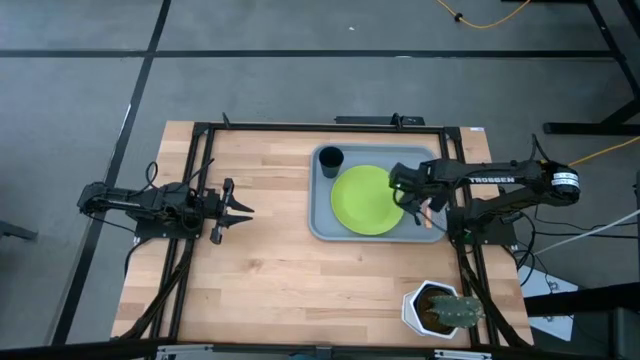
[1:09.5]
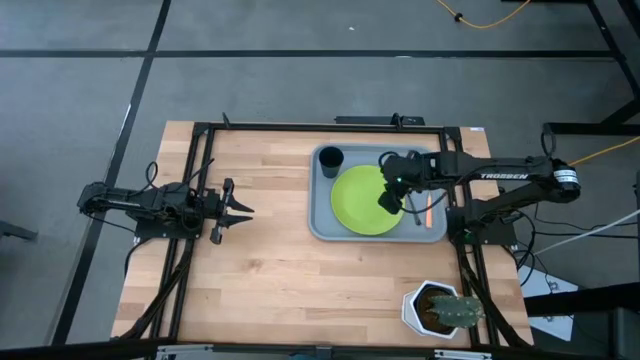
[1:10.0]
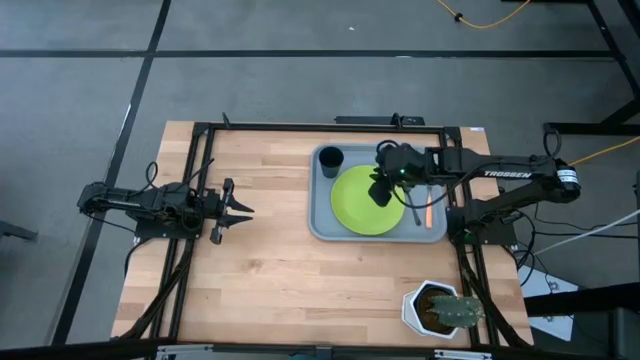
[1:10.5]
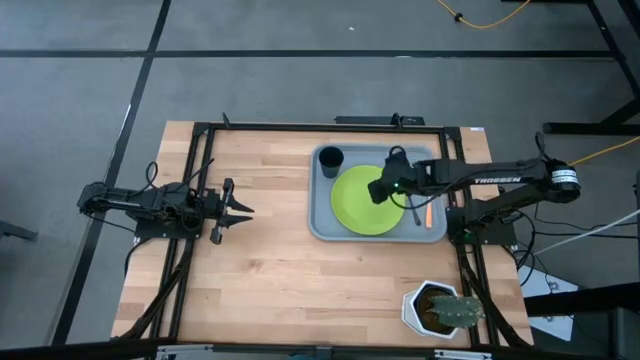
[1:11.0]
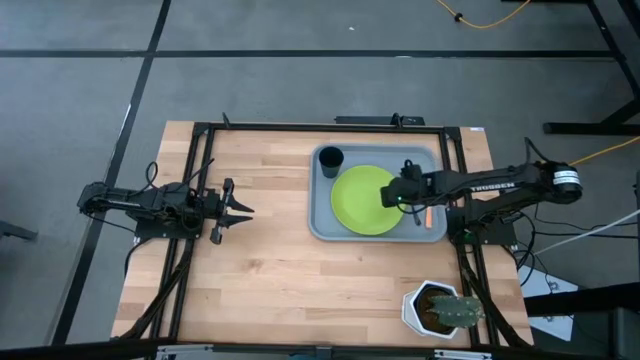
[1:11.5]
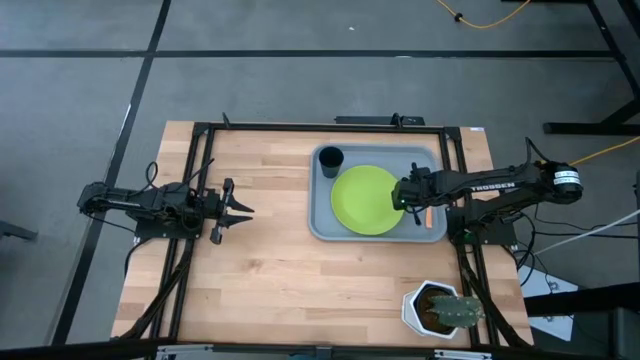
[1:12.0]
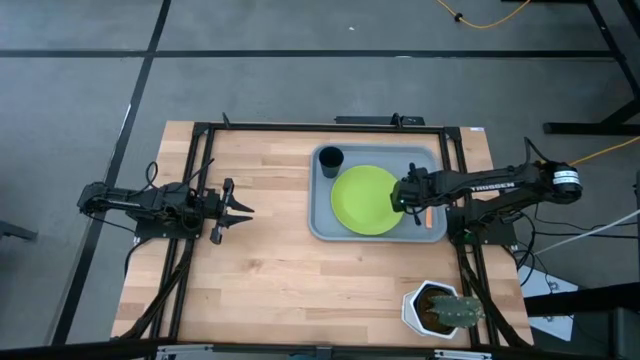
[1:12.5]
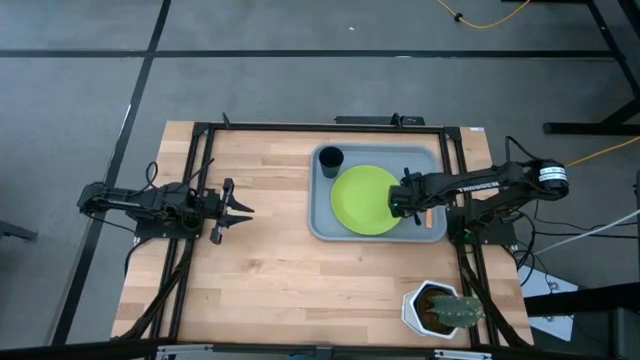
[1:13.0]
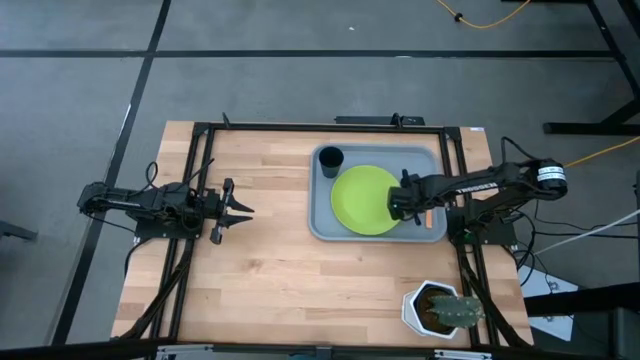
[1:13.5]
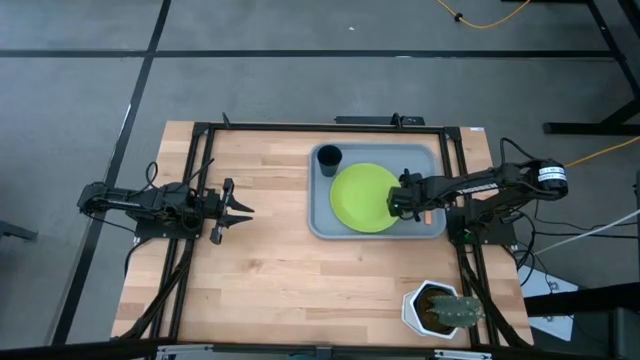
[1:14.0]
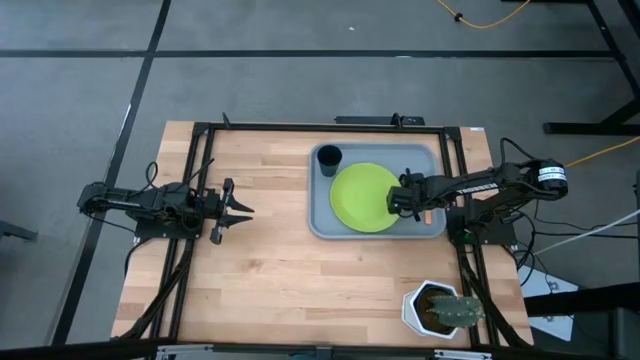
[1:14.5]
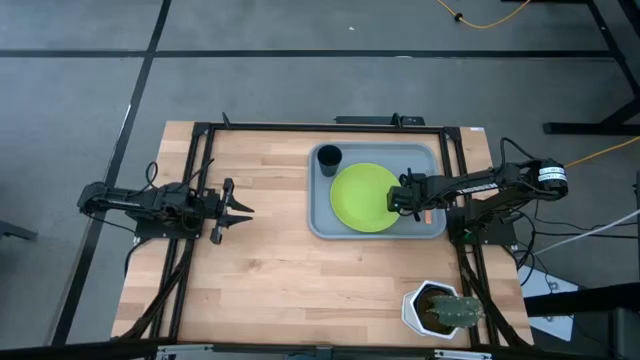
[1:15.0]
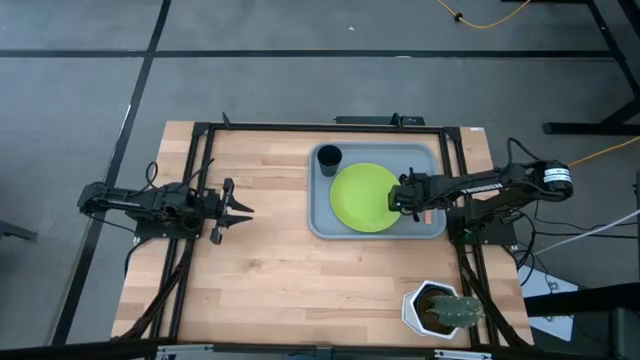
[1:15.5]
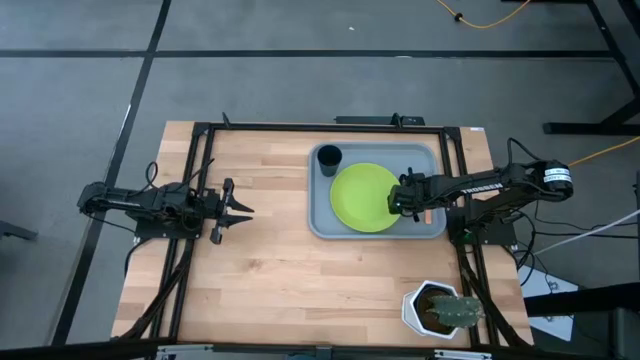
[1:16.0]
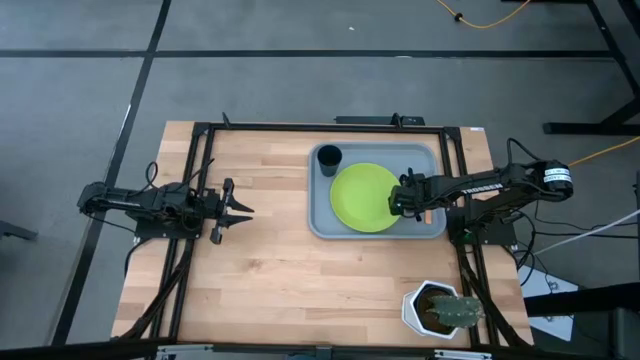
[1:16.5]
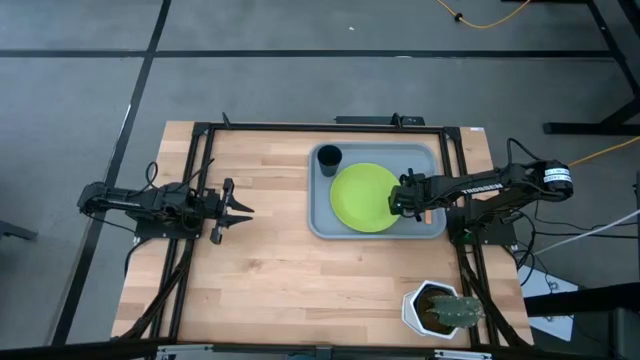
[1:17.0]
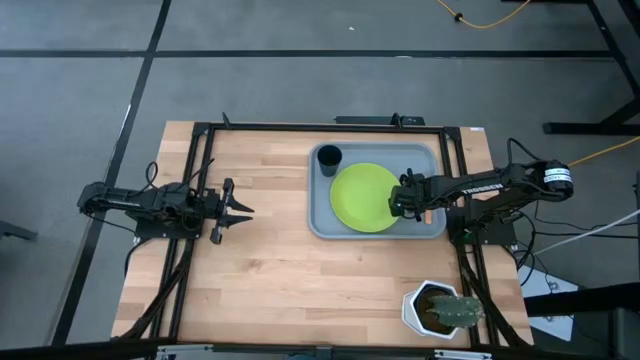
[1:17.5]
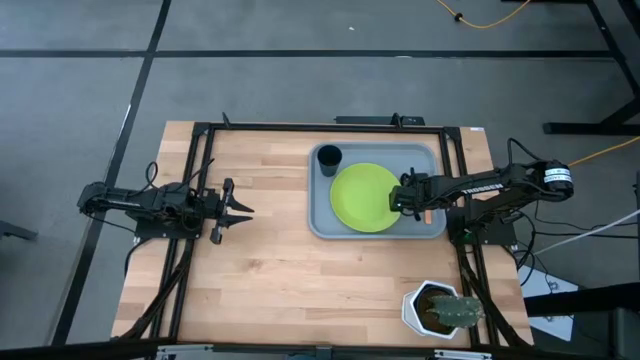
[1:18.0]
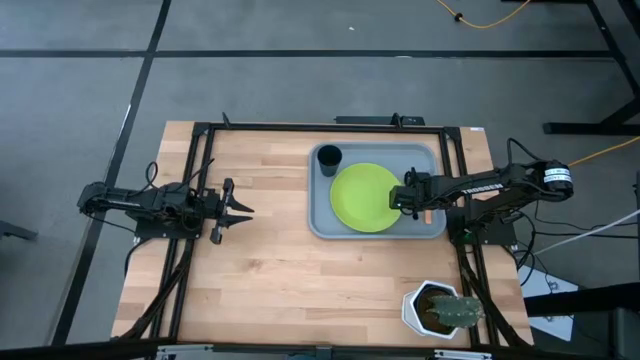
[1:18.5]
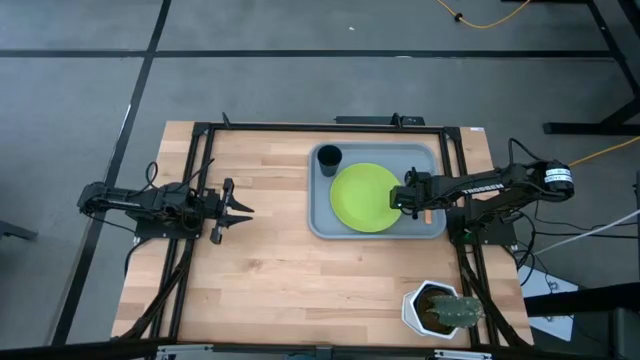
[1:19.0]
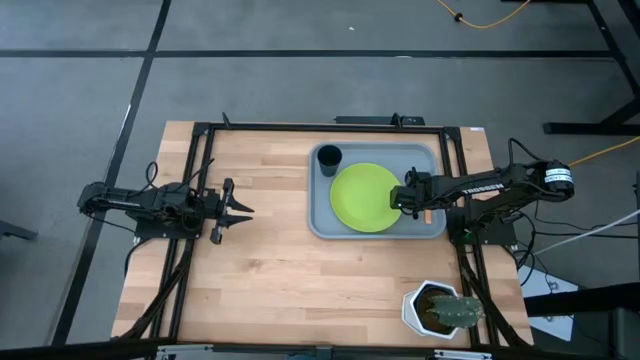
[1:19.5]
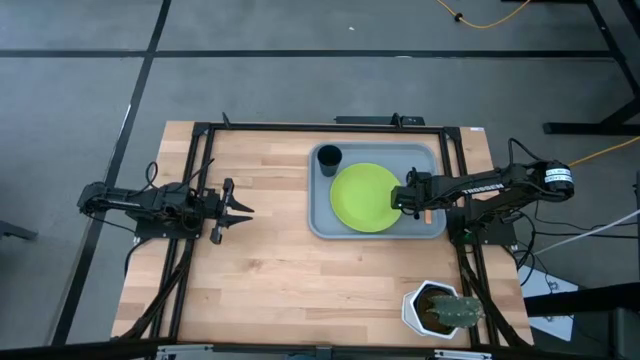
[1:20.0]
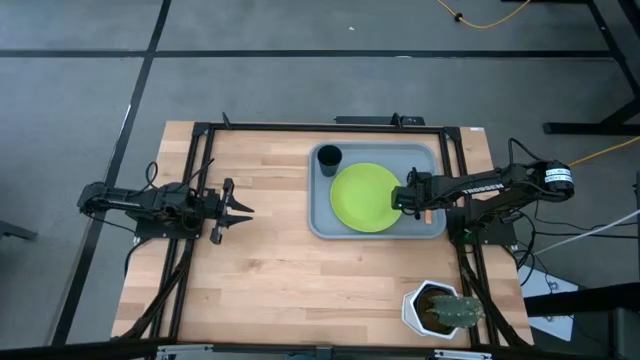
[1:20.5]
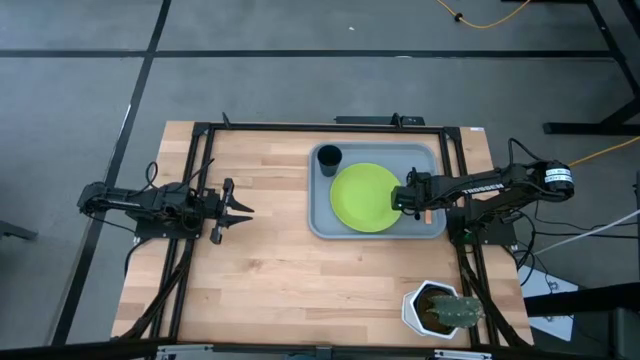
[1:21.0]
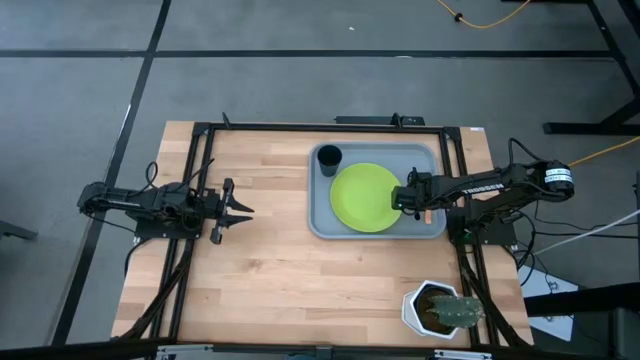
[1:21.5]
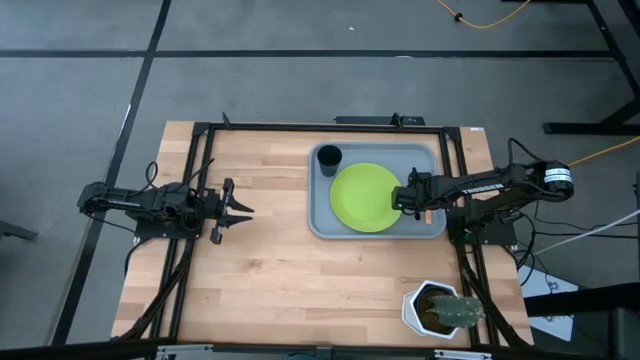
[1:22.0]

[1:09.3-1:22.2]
Task: Pick and place plate/cup/fork/spoon on tray
Put the black spoon on the gray serving tray to the right of the light green plate

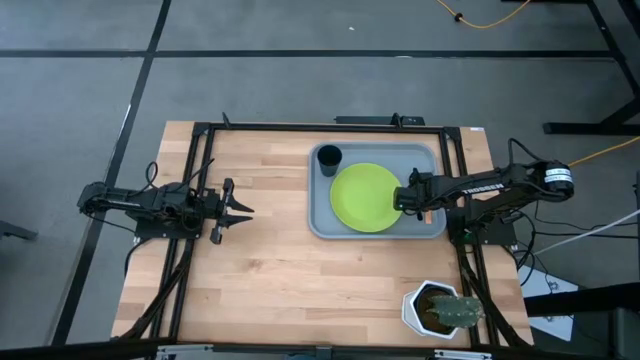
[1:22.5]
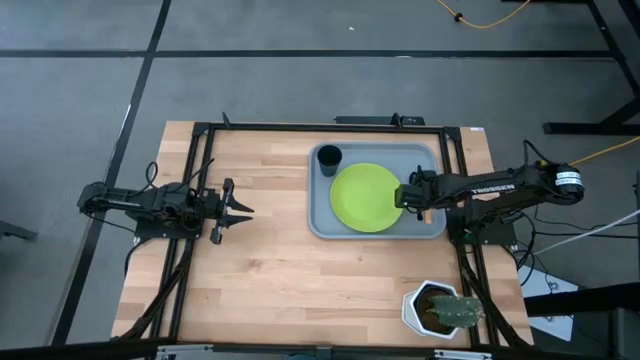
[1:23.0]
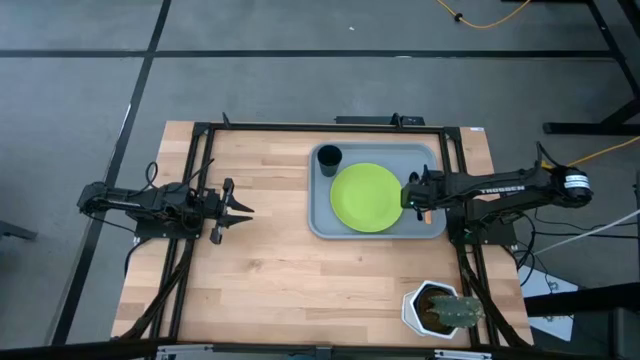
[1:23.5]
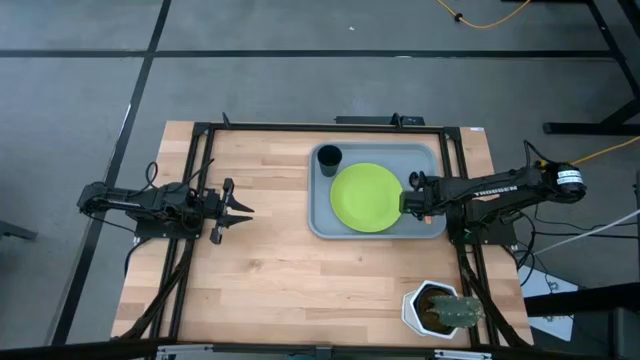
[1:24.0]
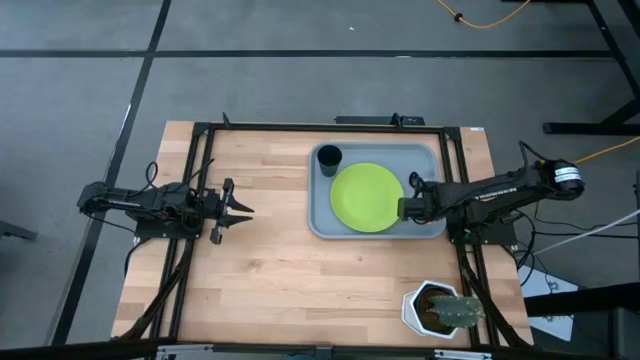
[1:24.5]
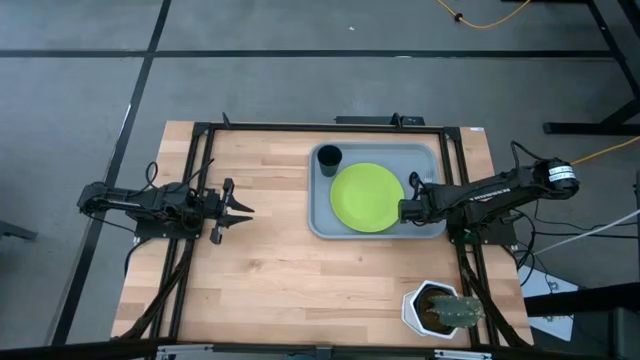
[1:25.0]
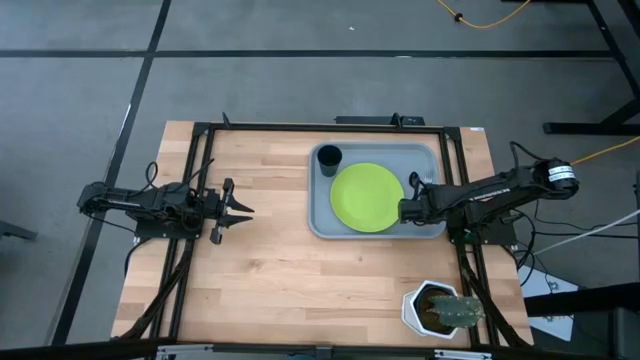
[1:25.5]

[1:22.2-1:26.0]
Adjust the orange fork on the gray serving tray

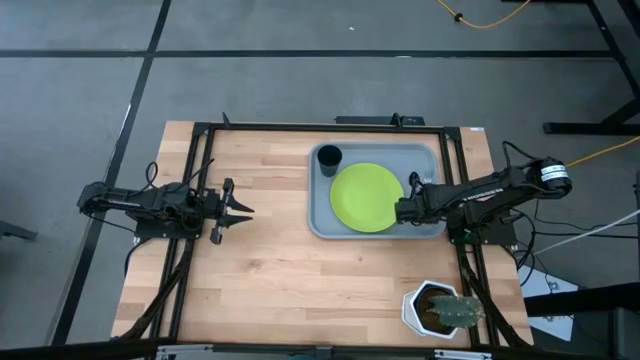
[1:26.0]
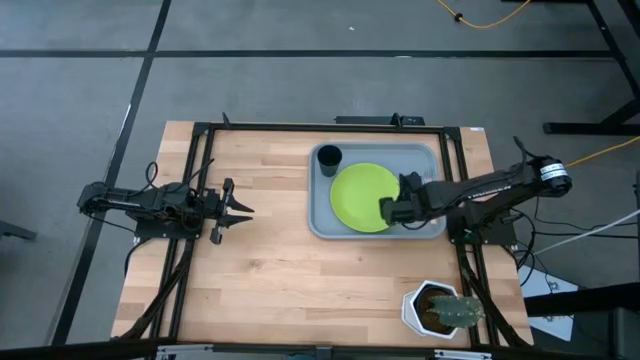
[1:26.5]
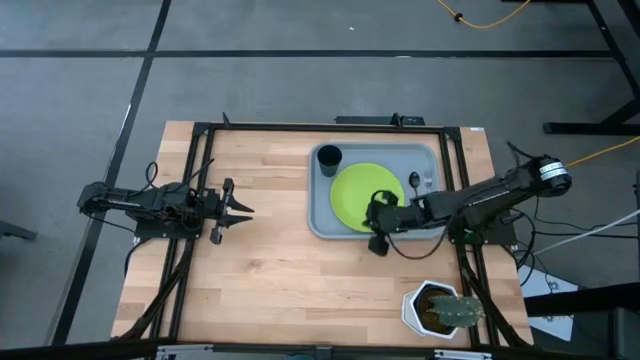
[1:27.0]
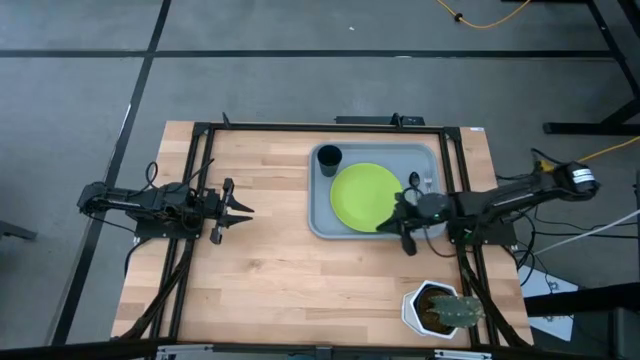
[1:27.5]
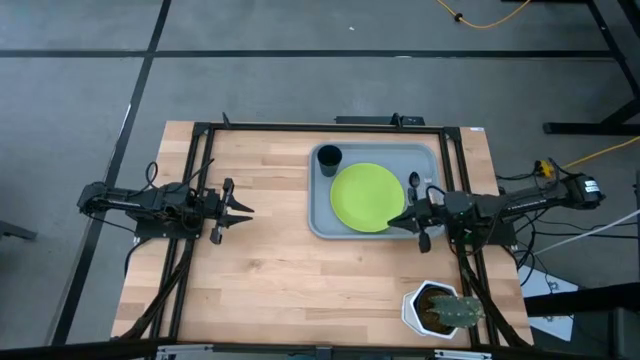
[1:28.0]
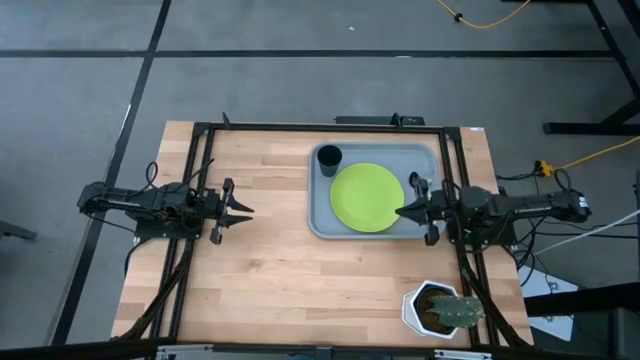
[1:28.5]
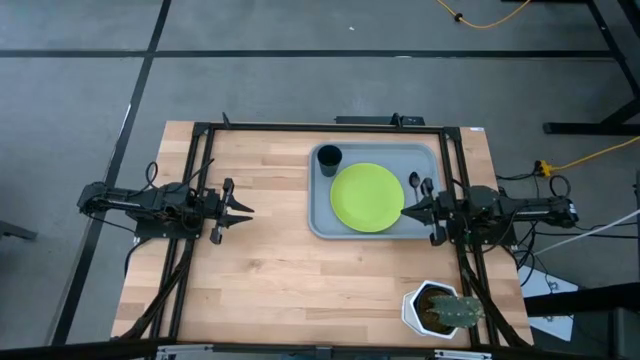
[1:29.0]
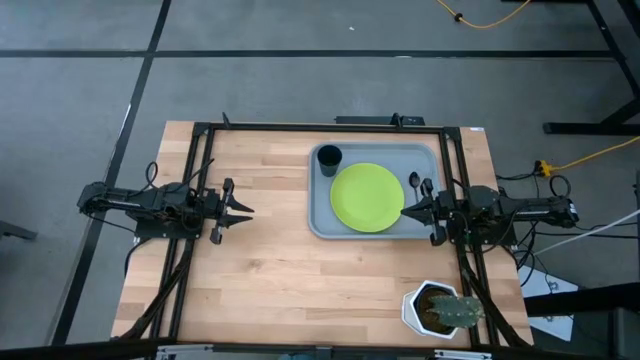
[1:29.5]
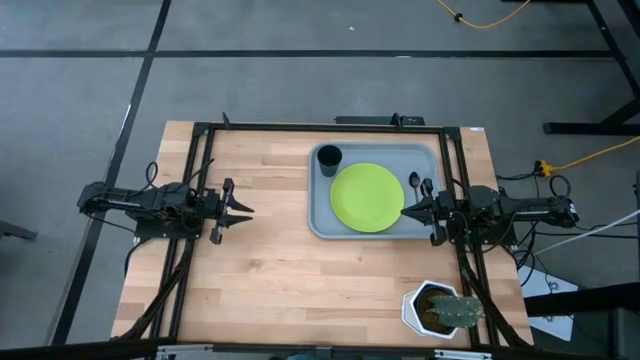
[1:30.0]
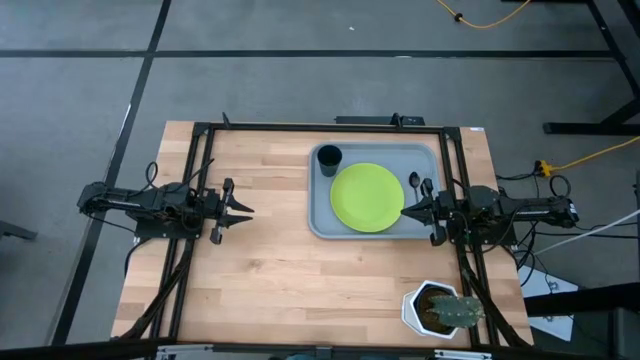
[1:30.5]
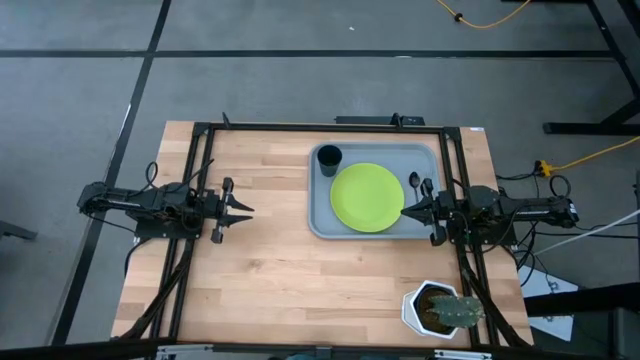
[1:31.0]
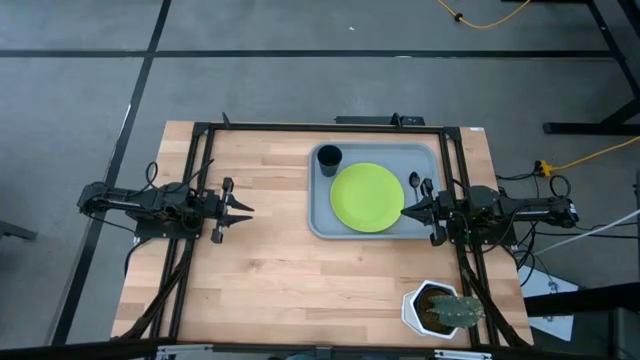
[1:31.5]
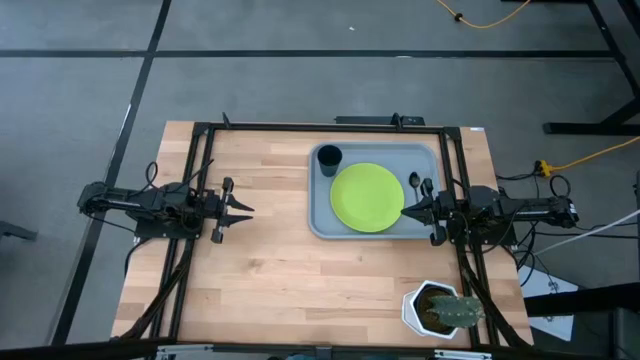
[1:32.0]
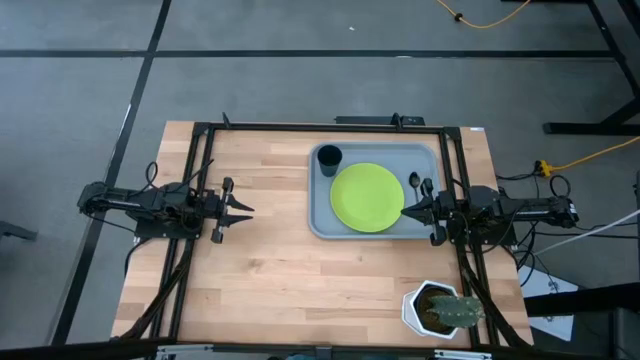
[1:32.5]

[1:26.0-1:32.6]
Return to Home Position
